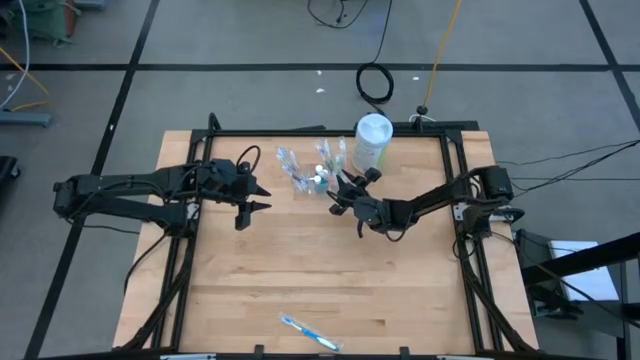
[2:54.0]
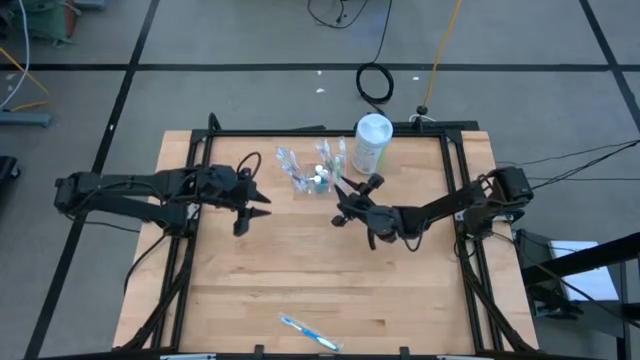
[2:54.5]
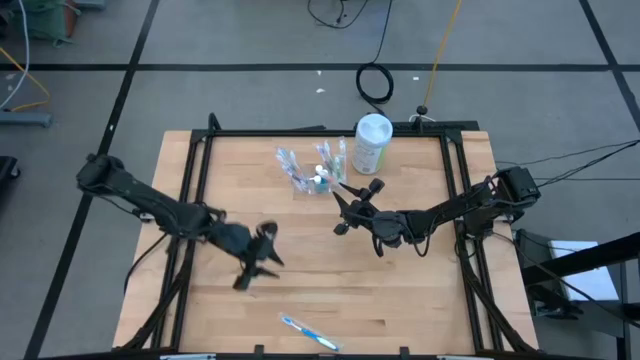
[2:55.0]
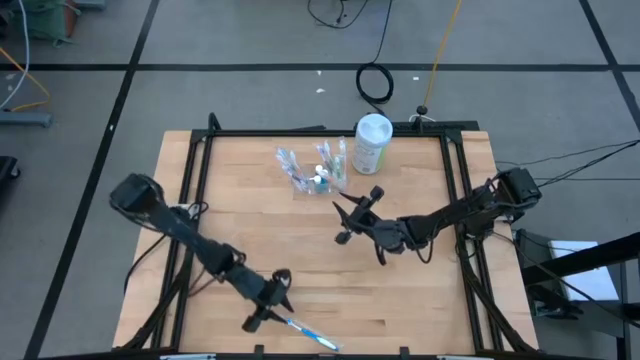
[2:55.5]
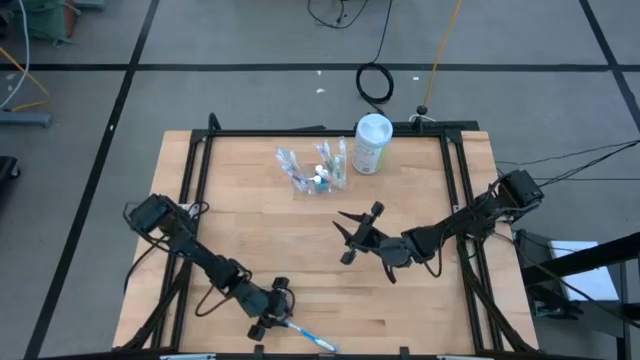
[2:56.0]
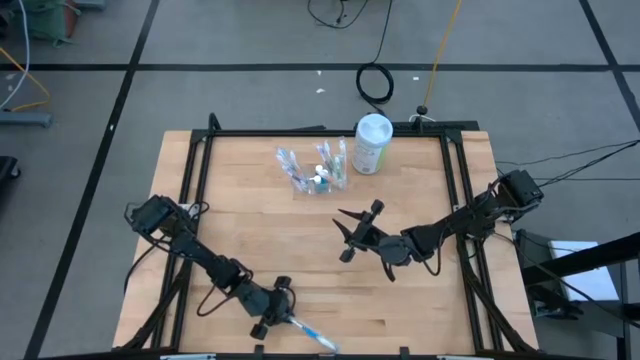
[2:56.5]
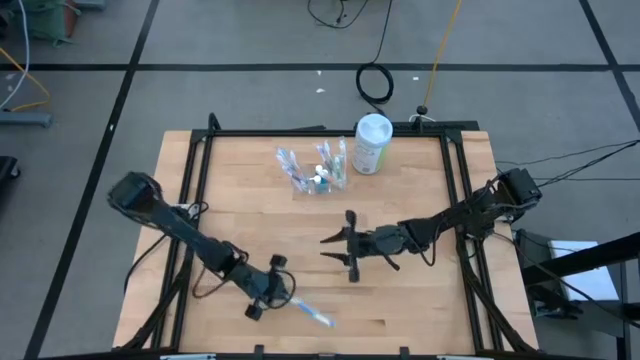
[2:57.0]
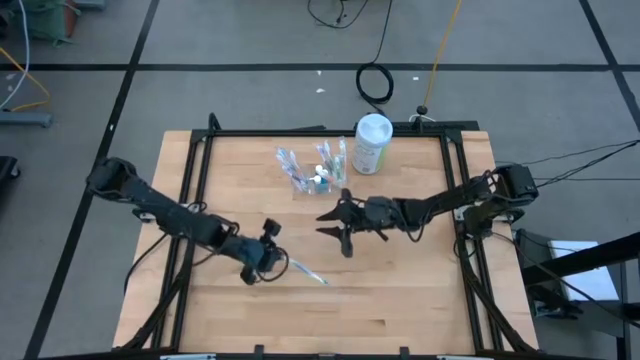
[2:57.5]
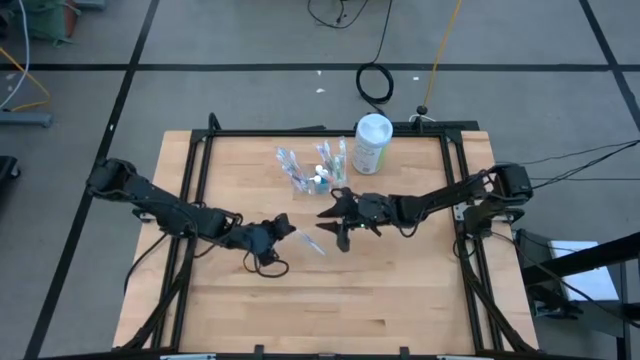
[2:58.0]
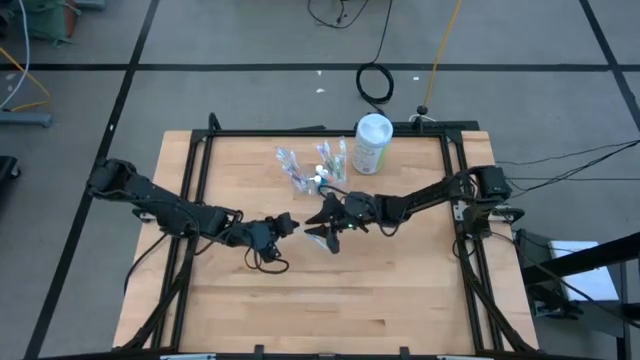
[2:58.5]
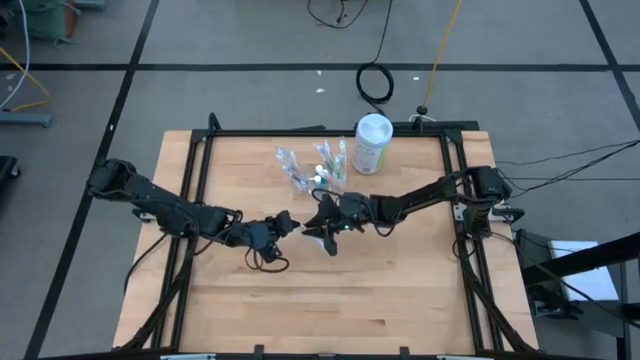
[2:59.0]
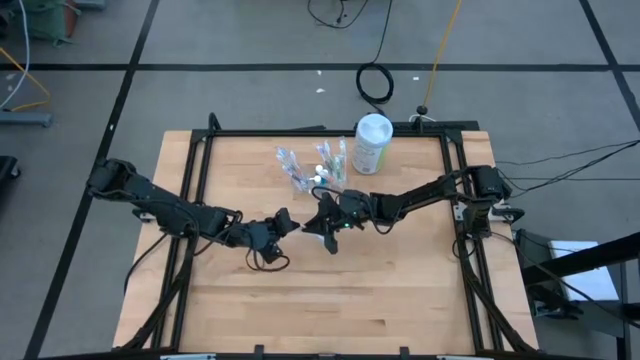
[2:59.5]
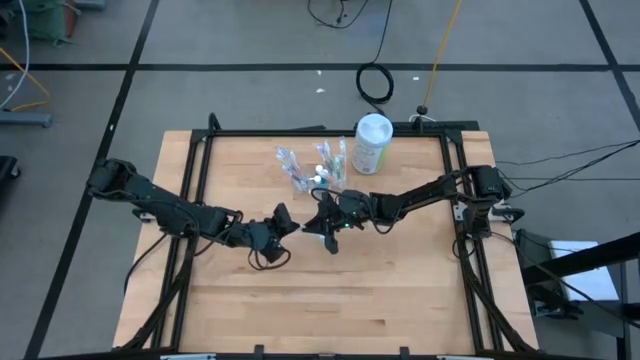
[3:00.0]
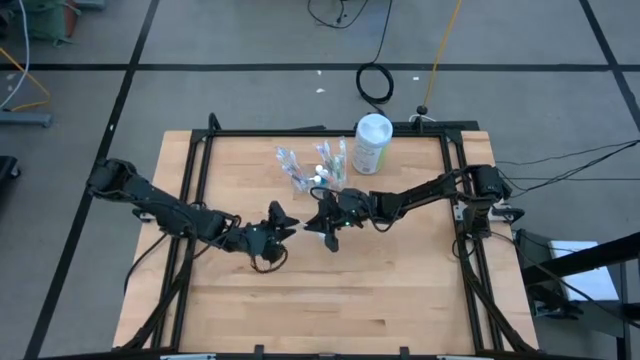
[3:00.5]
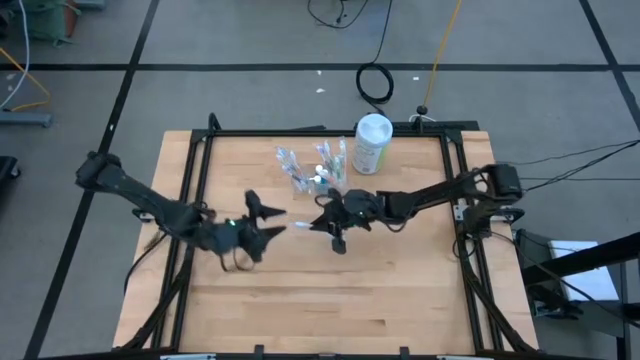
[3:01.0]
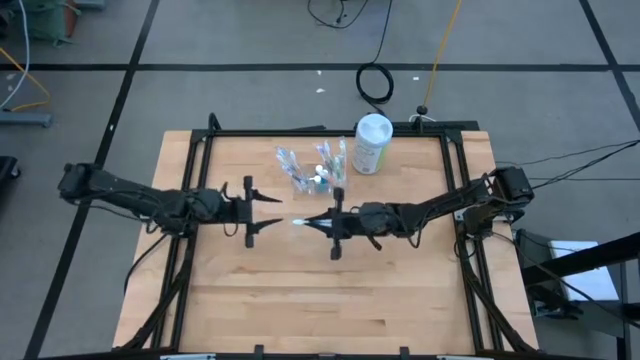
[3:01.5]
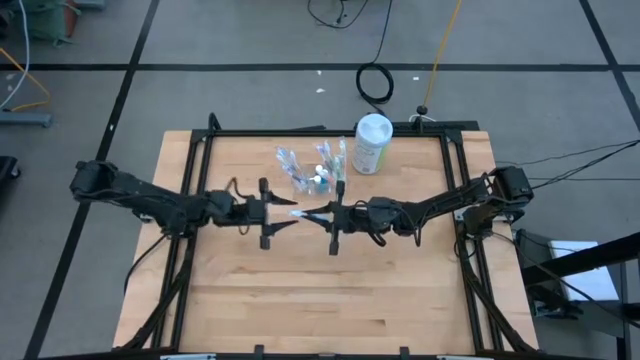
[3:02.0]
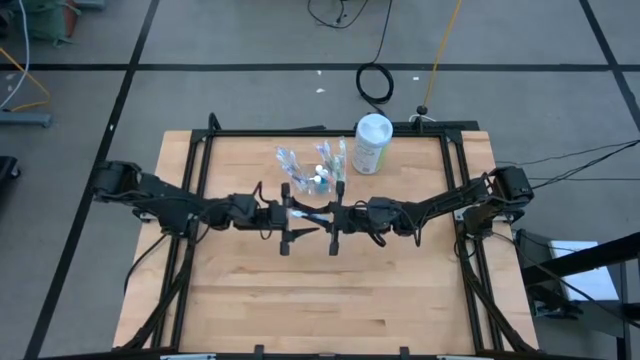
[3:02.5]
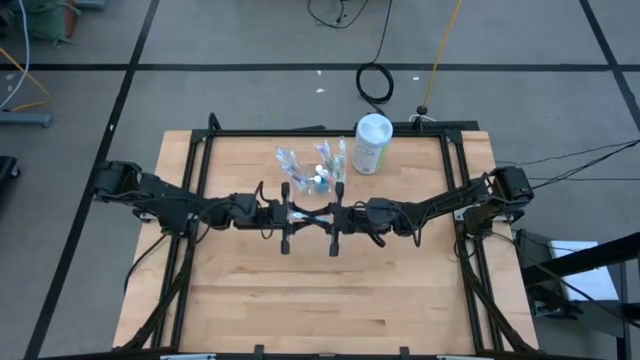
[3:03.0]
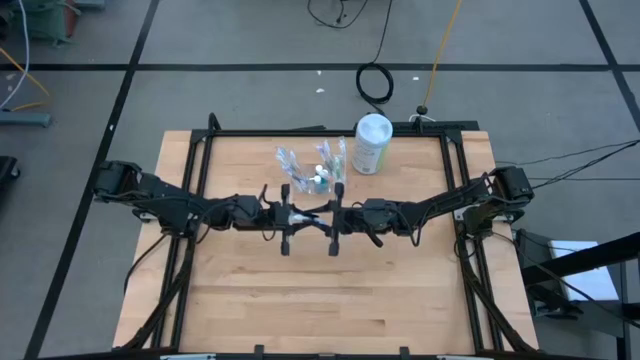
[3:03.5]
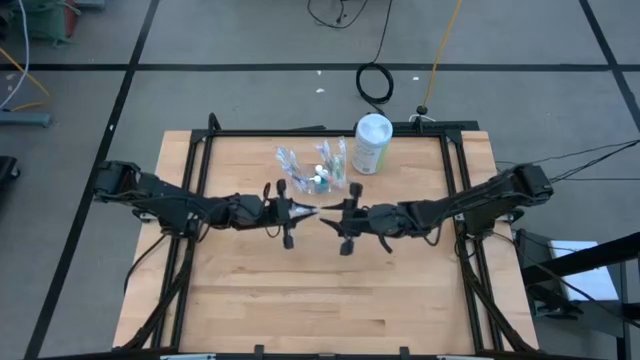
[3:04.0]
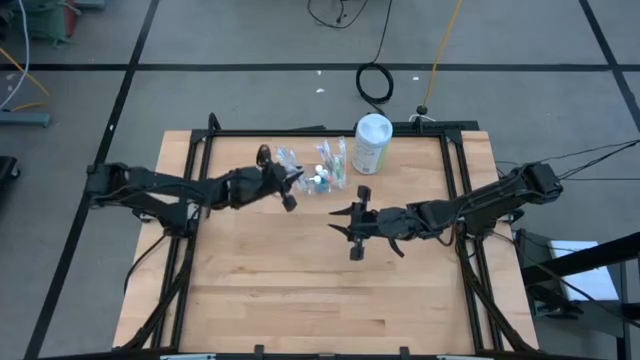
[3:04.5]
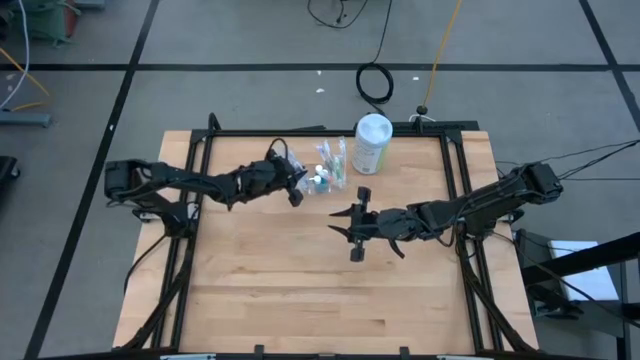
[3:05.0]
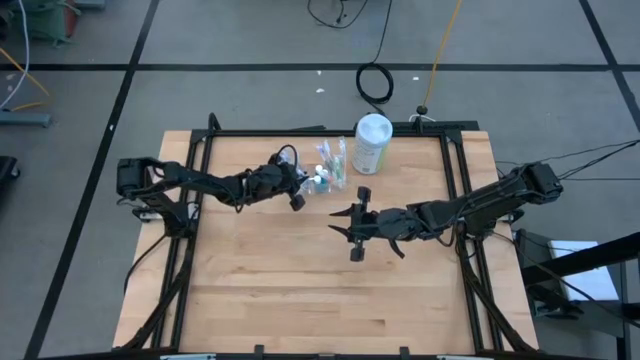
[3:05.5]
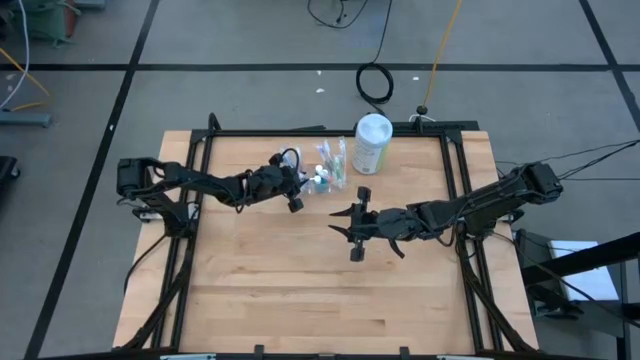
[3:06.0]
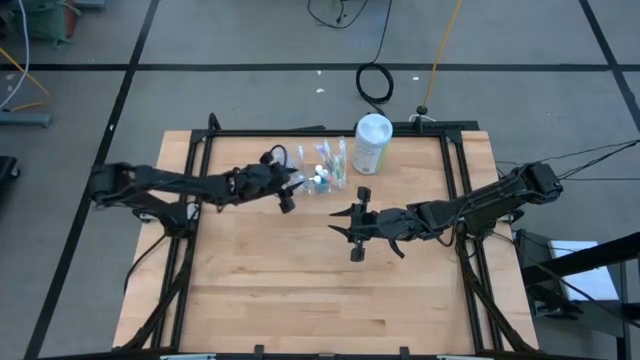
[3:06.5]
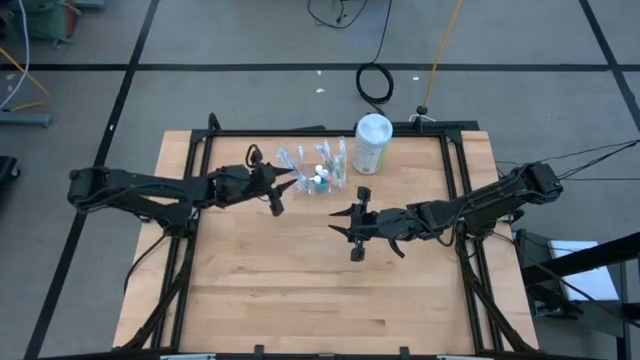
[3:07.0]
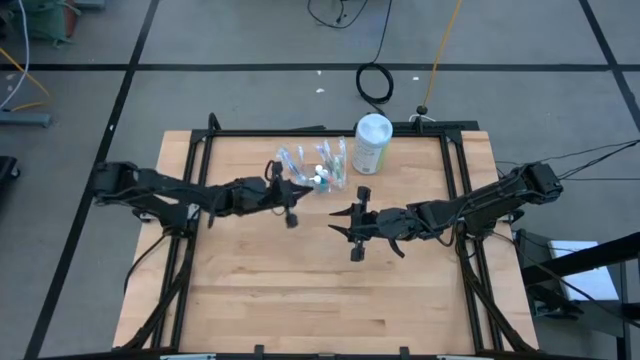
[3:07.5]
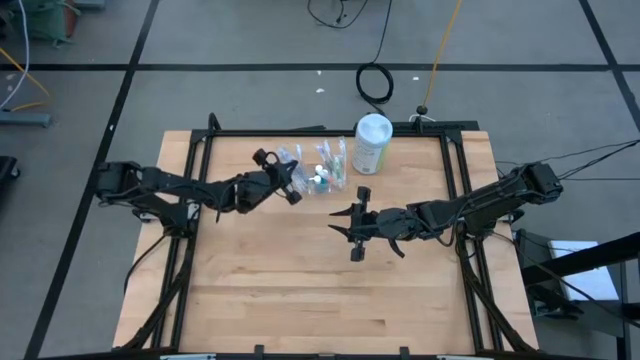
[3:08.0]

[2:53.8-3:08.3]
Task: Pick & Place toothbrushing station
Put the blue toothbrush into the left compartment of the transparent organizer

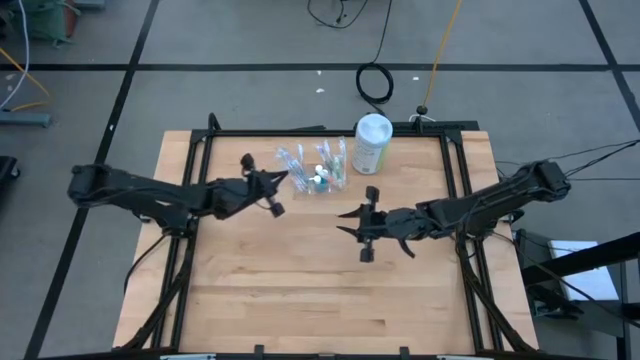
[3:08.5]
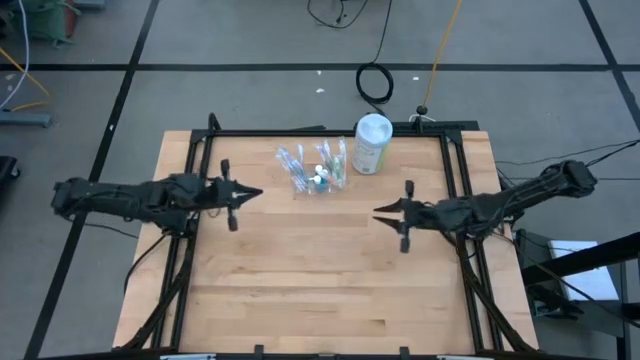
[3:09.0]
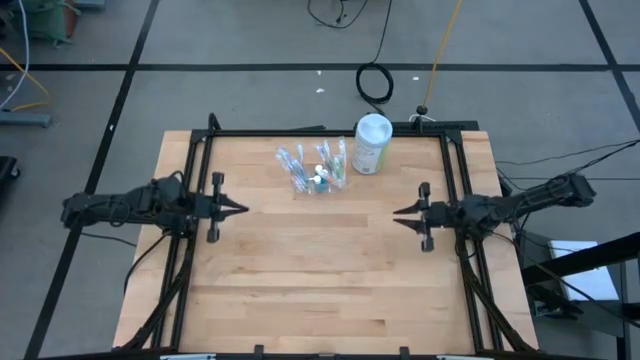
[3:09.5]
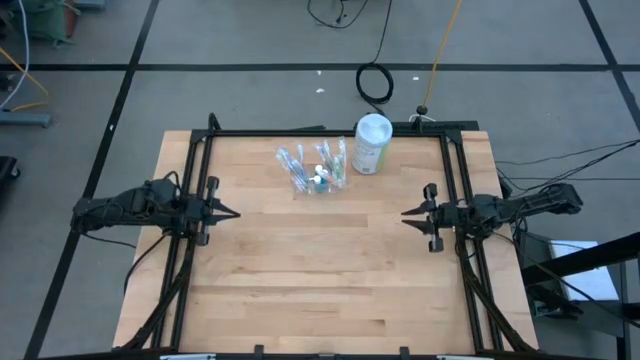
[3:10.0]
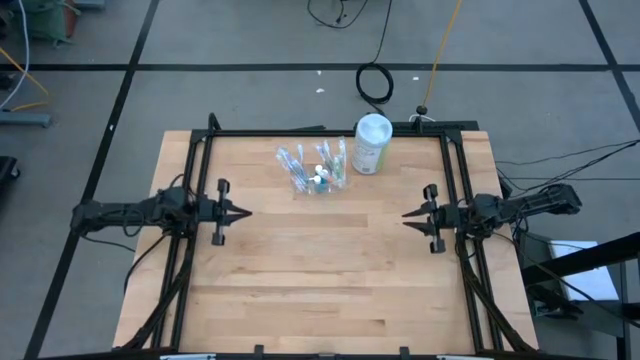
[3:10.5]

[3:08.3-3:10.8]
Return to Home Position

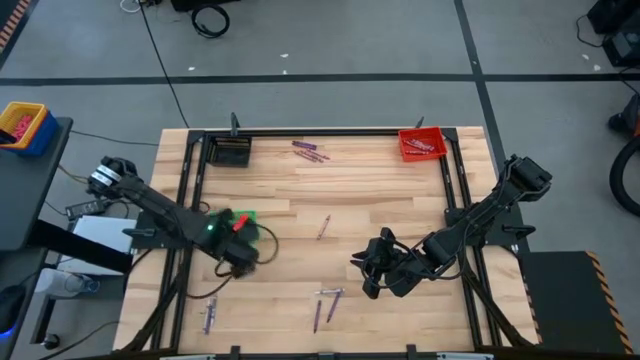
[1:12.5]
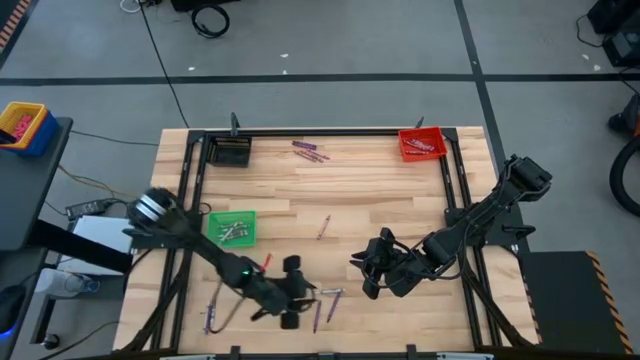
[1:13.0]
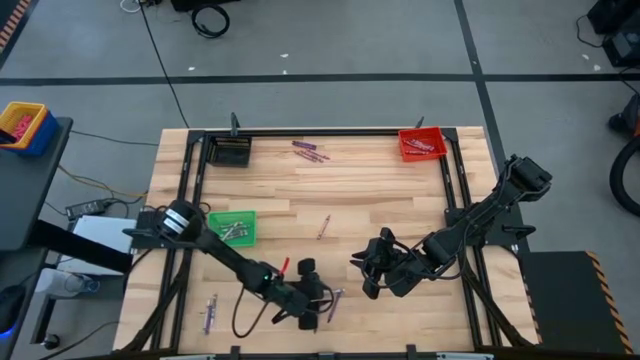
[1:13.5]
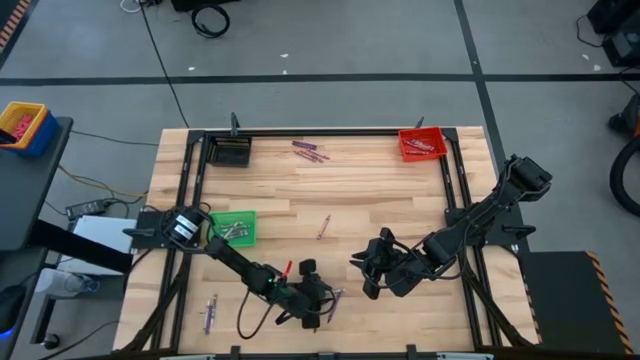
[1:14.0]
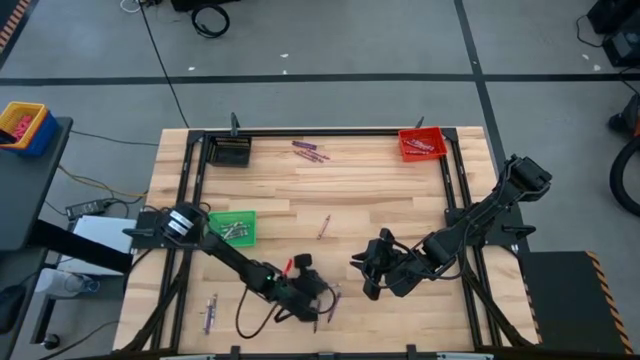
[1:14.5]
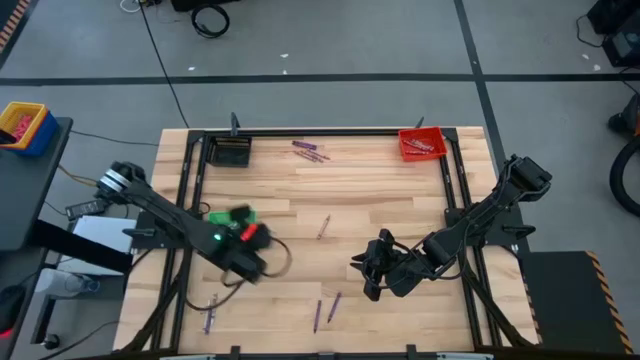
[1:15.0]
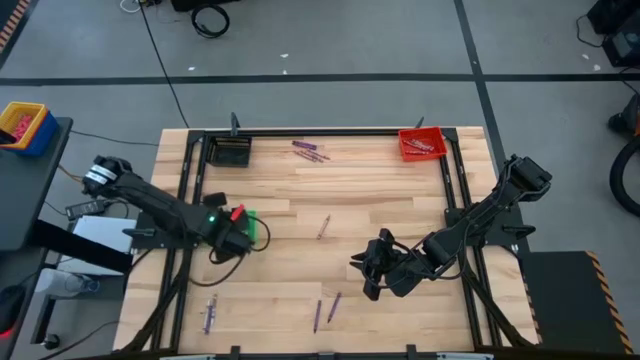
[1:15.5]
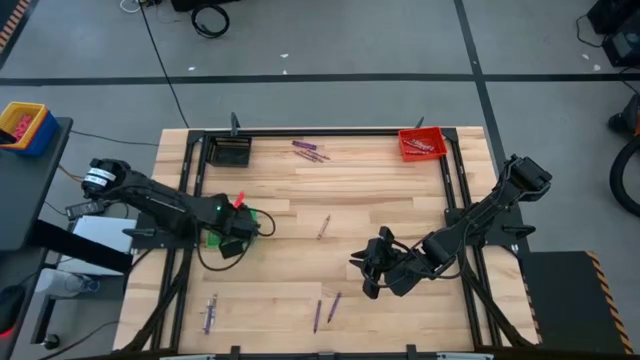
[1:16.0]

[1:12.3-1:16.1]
Task: Sort crayons
Put the white crayon into the green bin

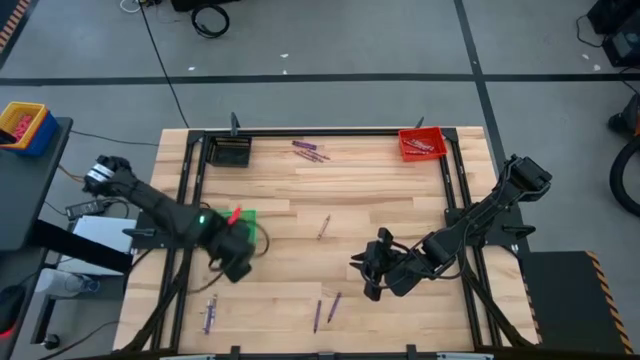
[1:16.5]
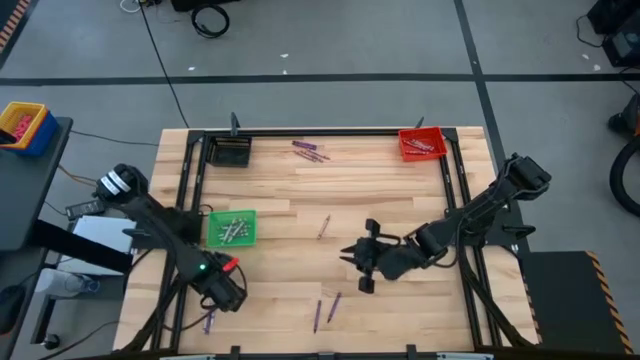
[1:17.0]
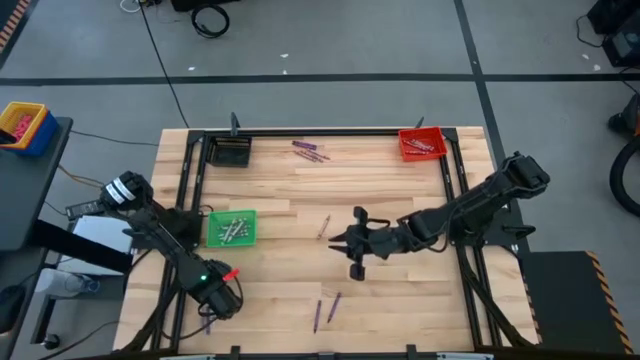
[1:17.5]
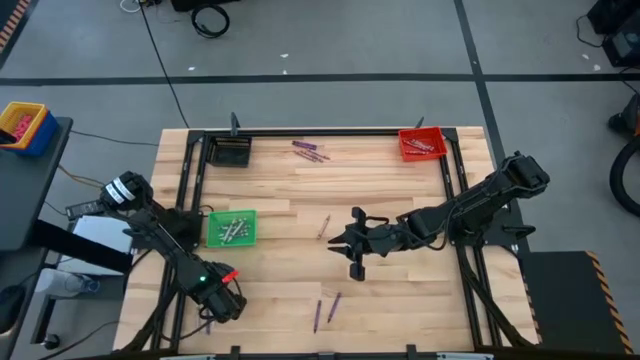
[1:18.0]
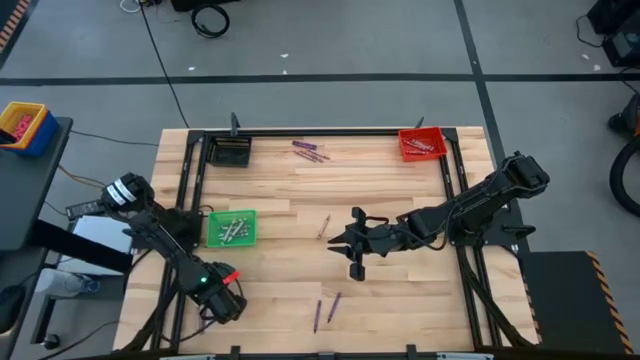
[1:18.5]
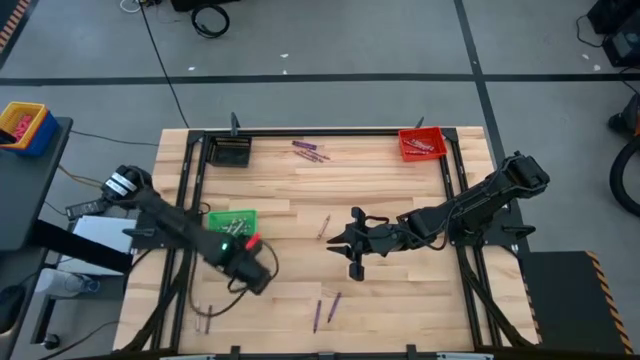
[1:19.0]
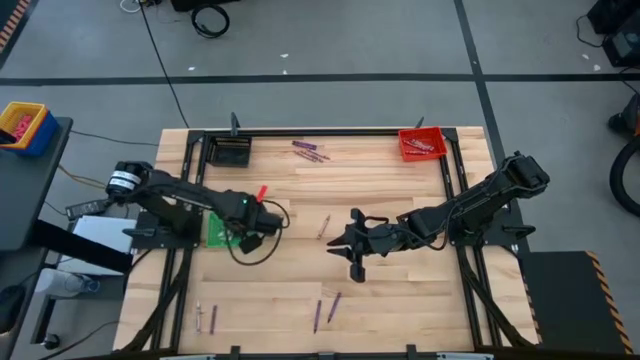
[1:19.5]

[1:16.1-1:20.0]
Put the white crayon into the green bin
